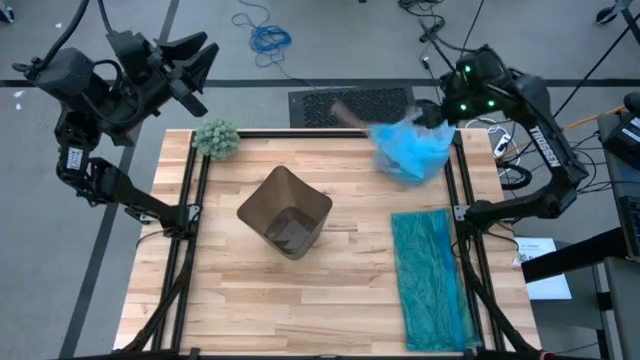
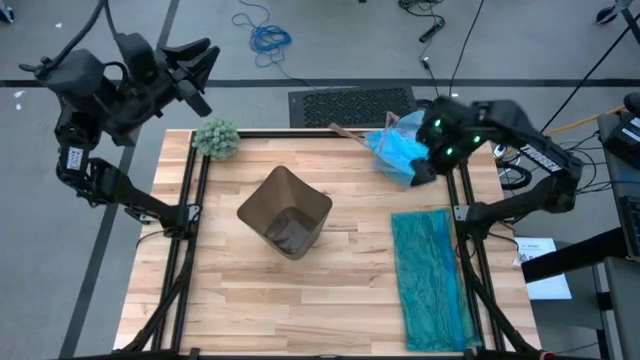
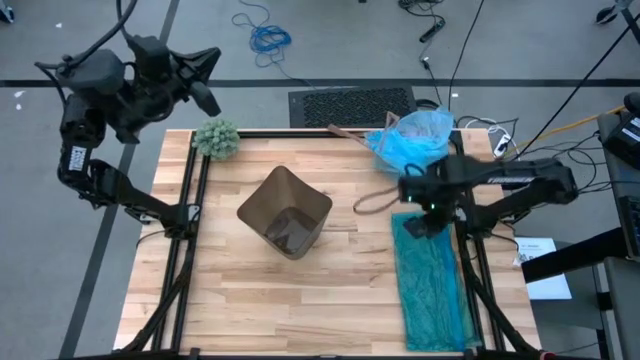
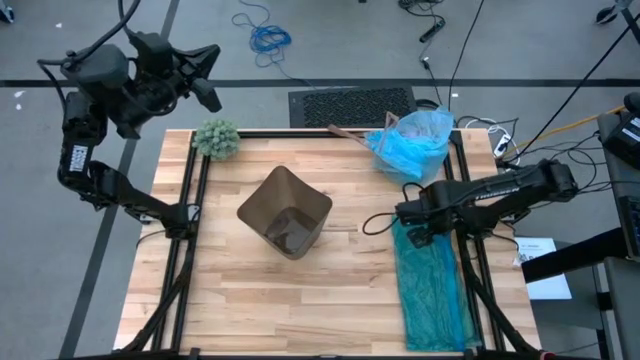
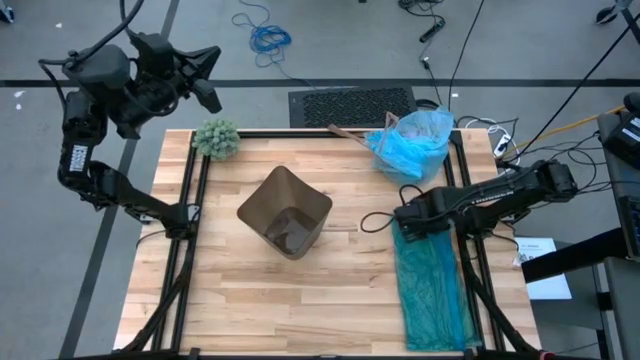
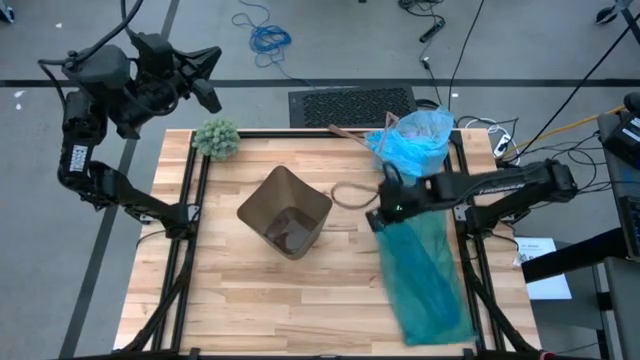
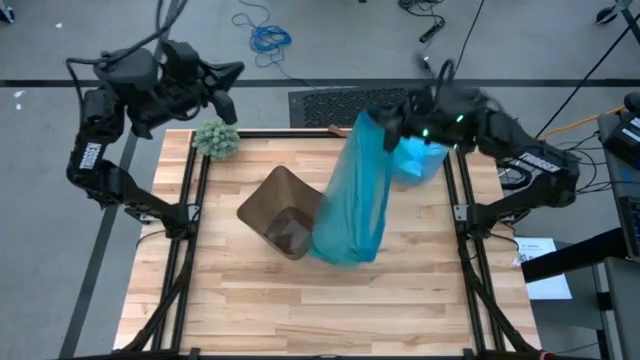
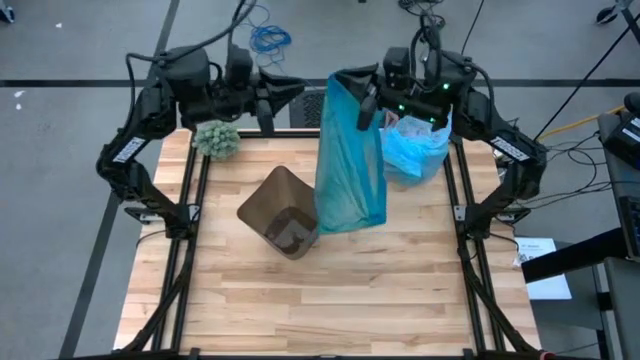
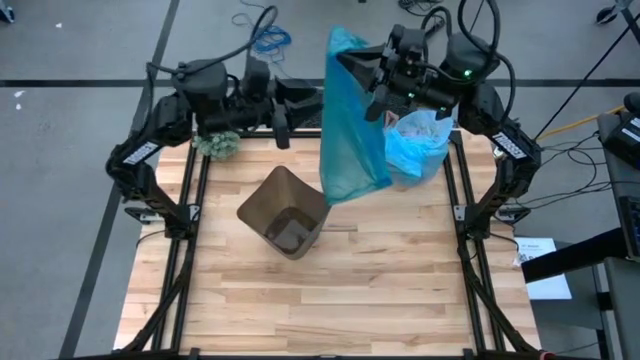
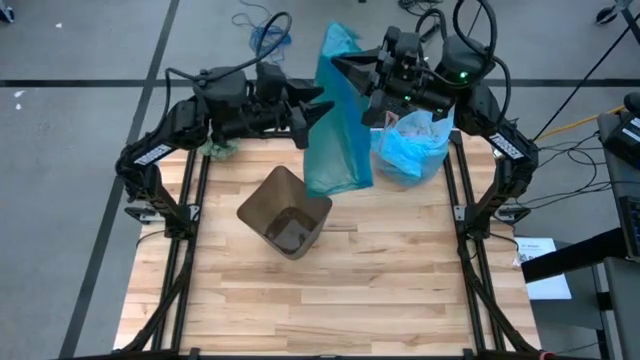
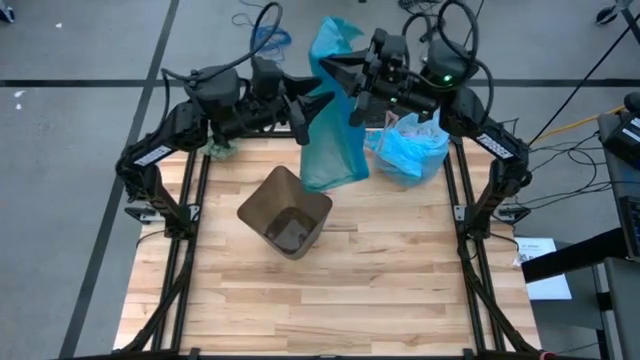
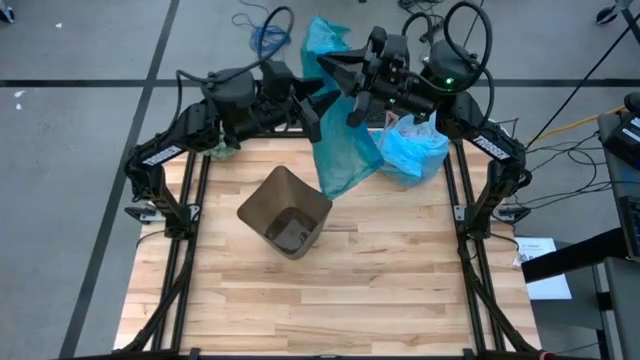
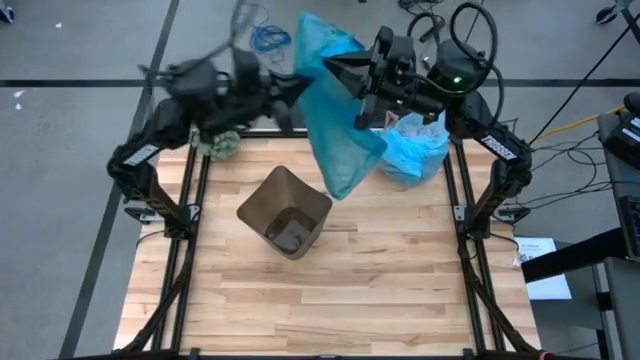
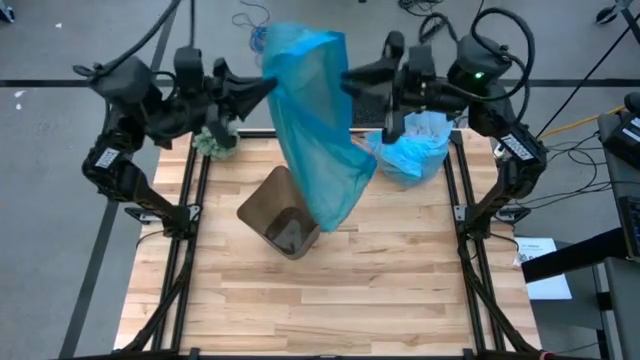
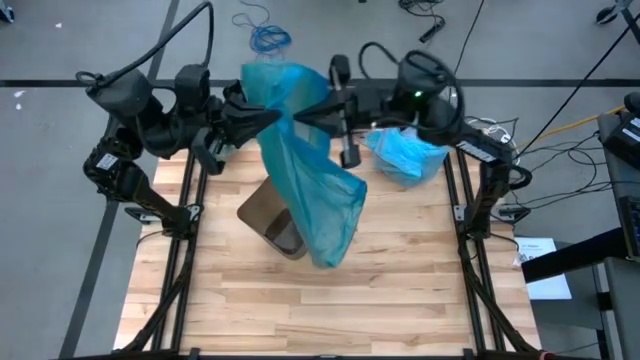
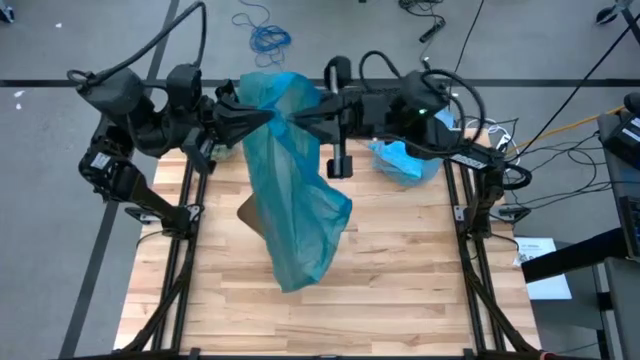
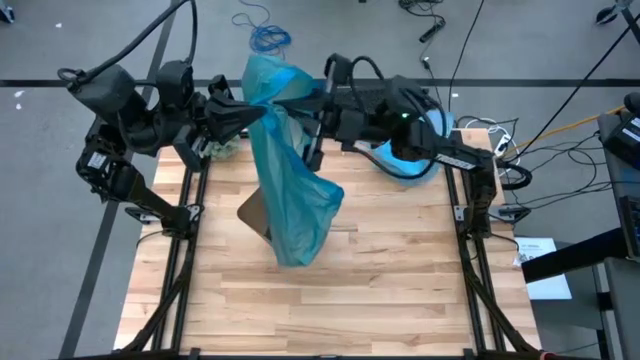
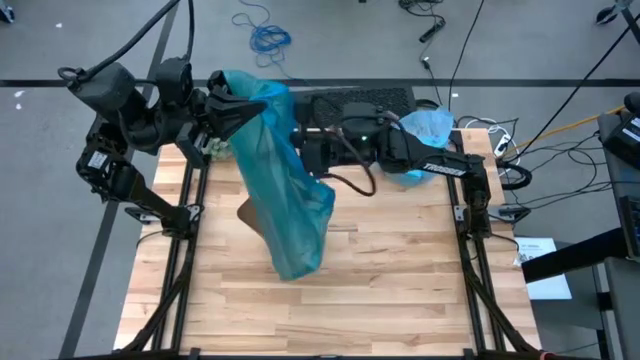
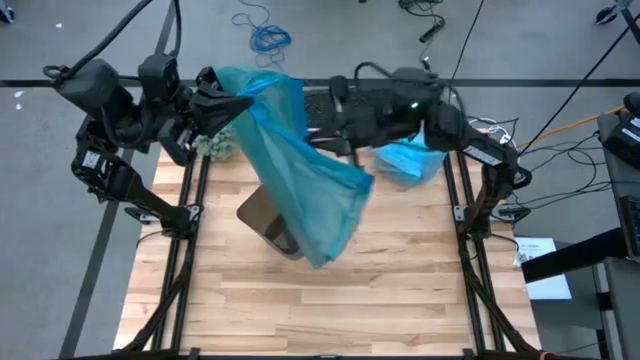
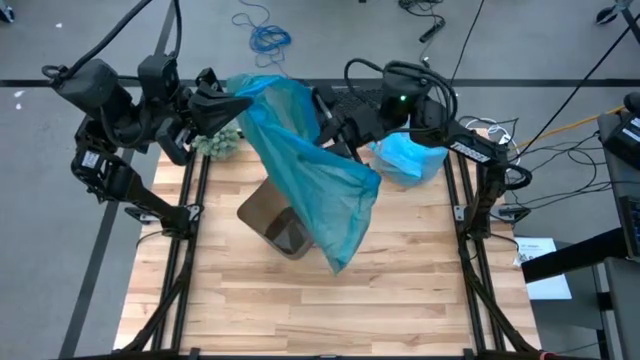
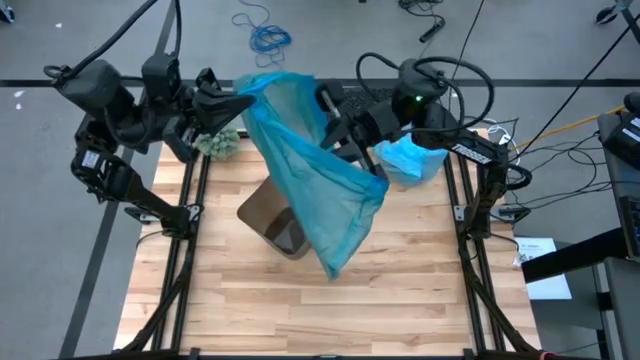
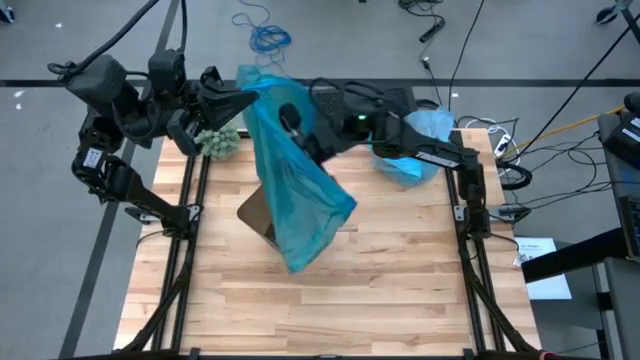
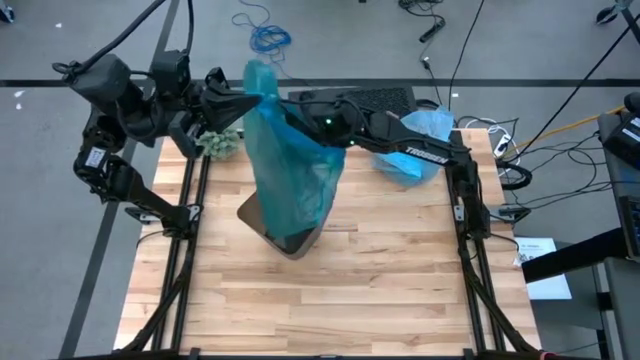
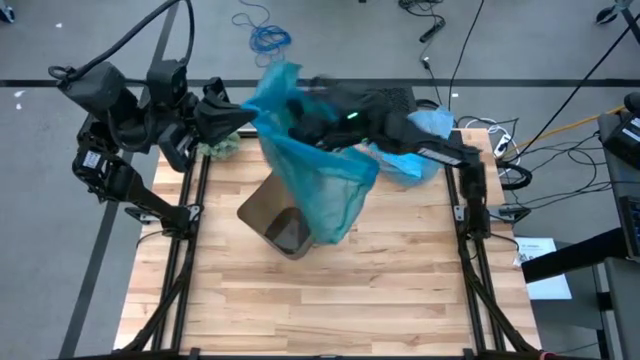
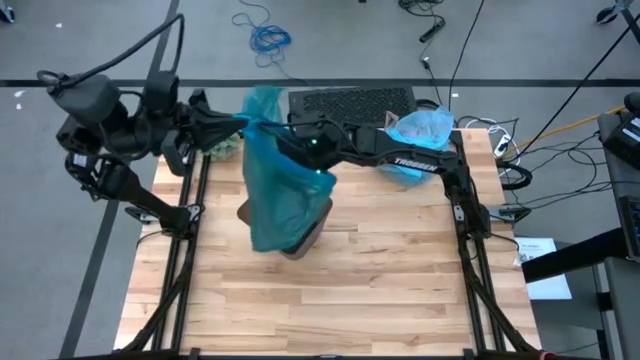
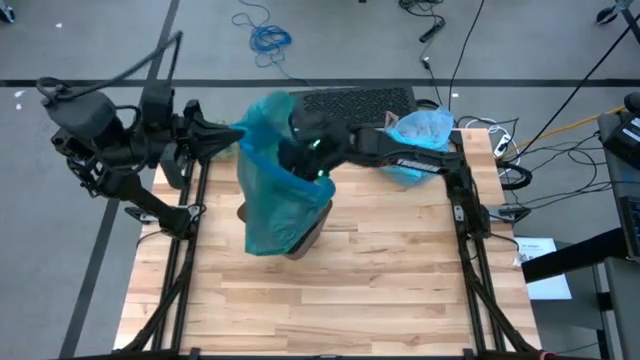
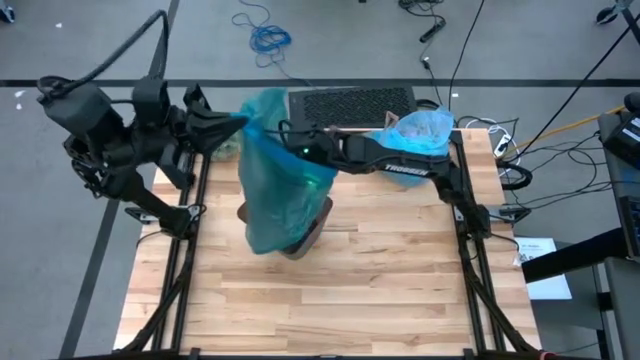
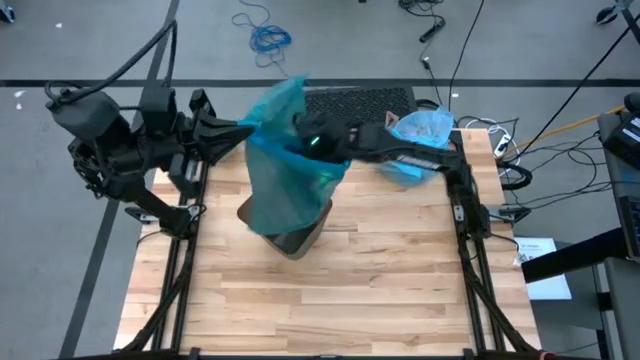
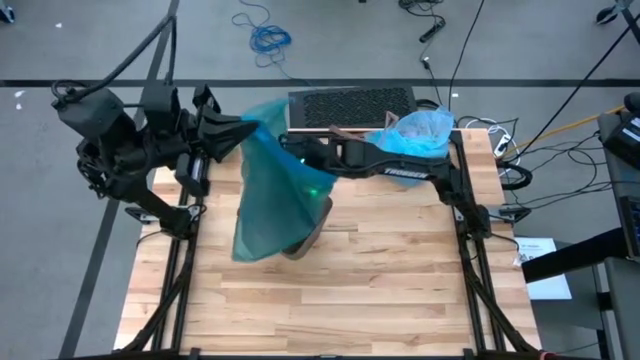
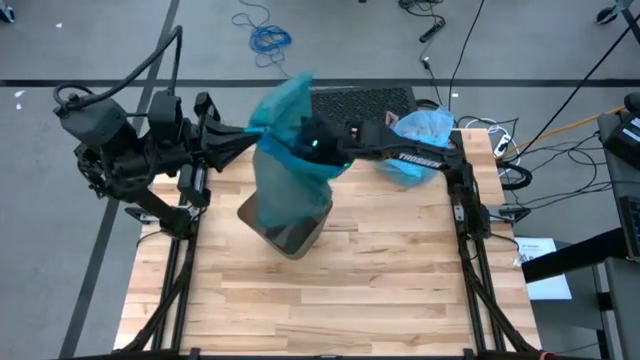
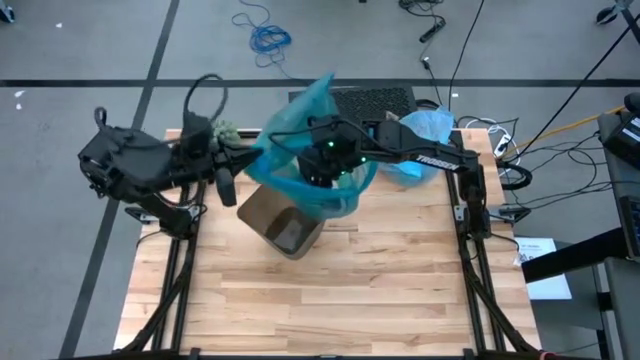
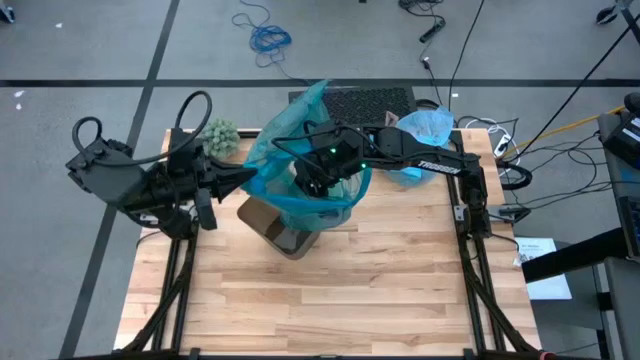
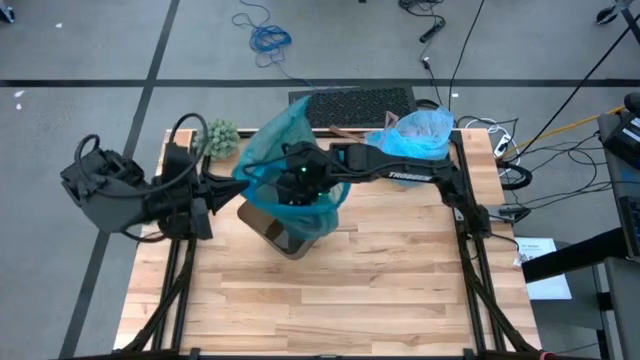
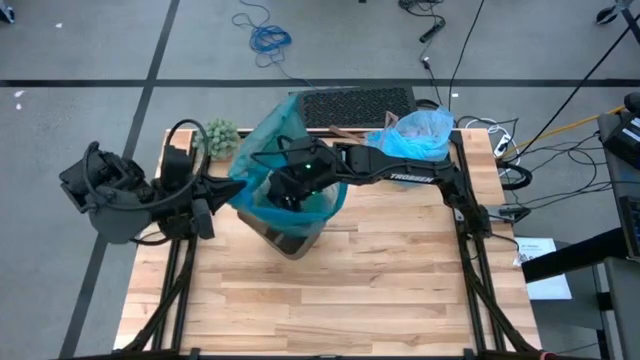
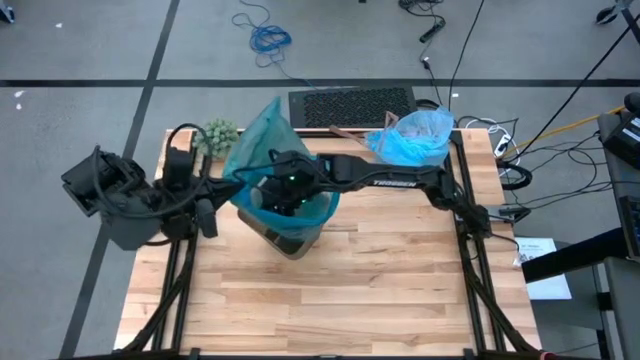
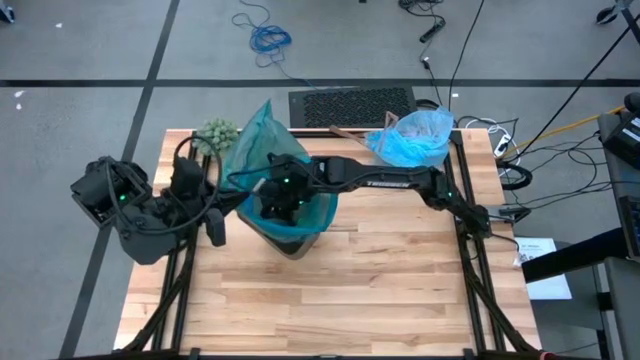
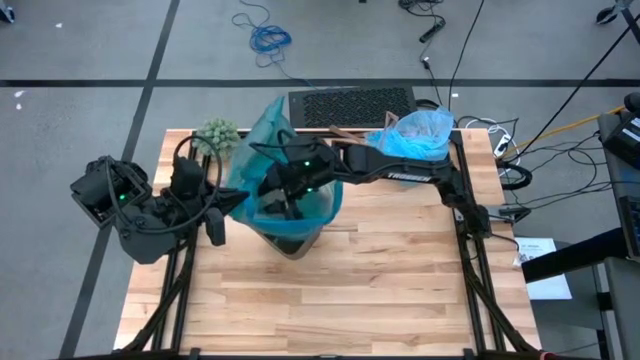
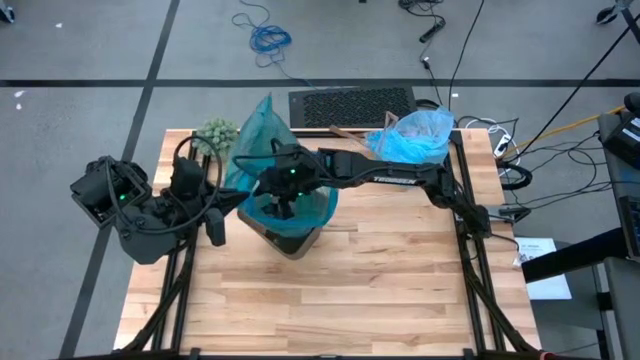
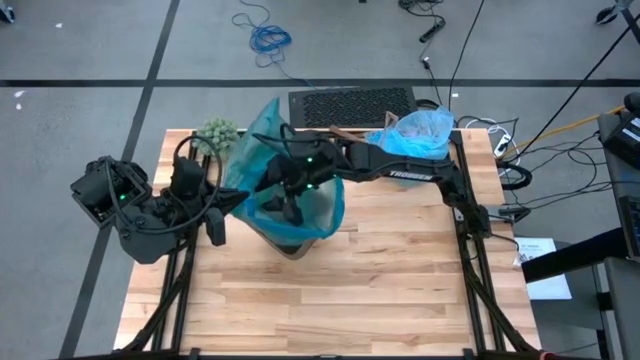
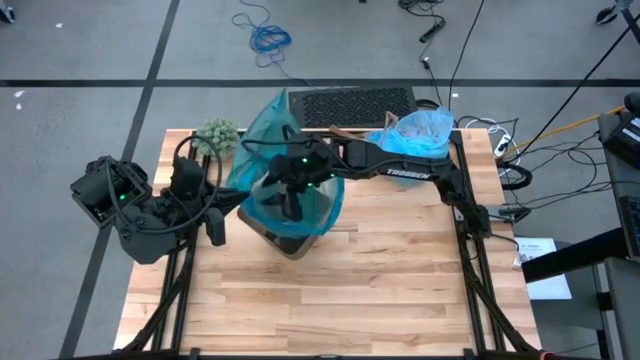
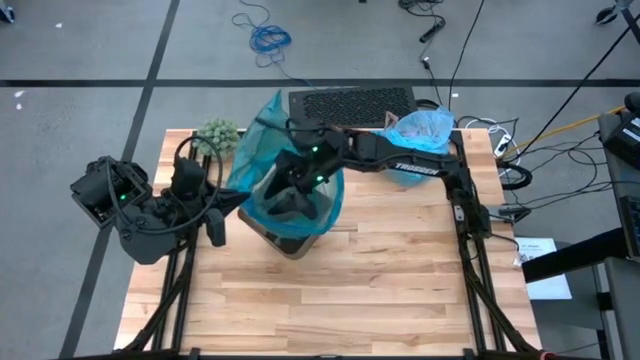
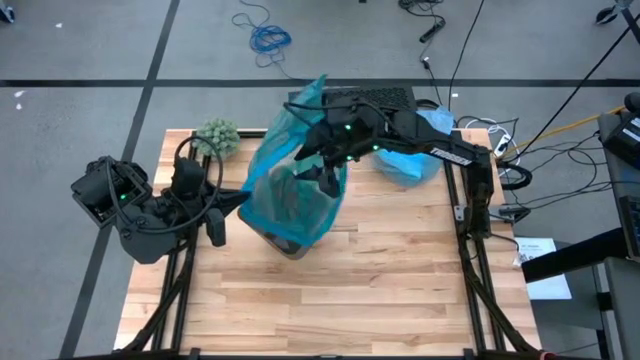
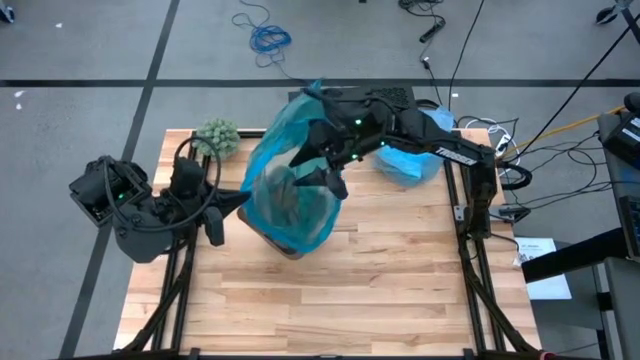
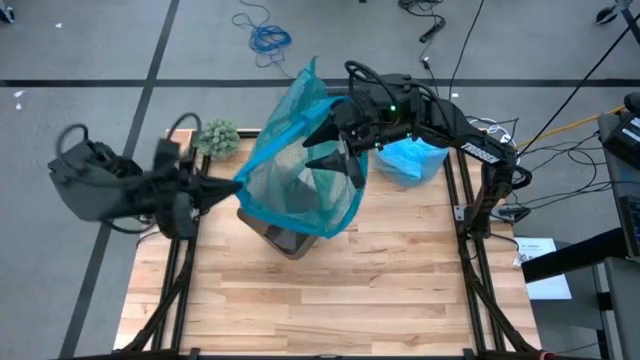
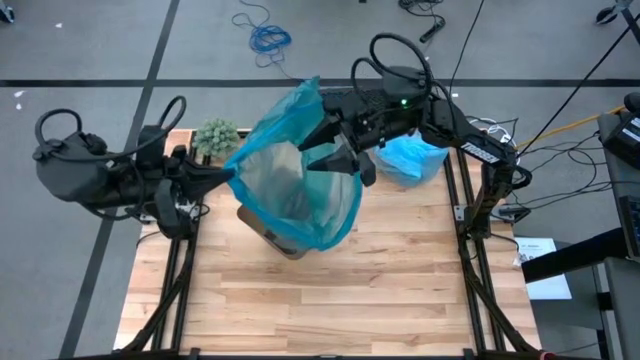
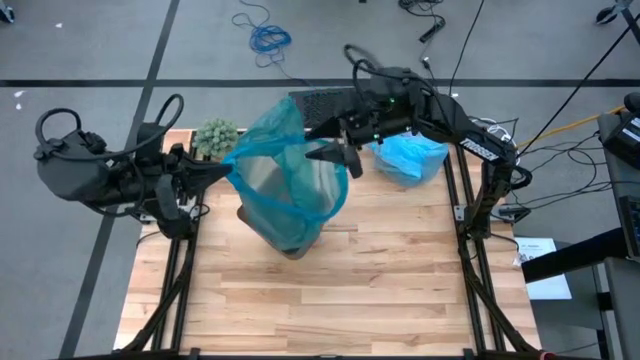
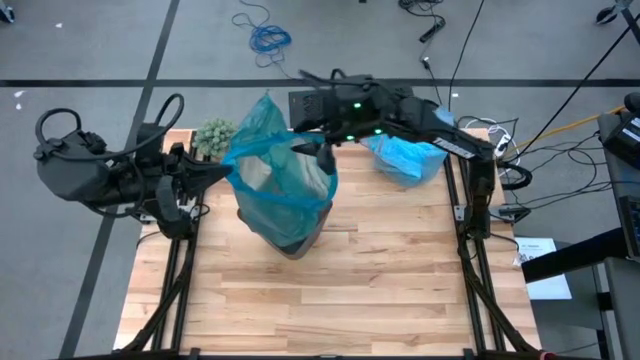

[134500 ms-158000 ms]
Task: place trash/remove bag and relplace
Insert the bottom blue trash bag into the trash bin
